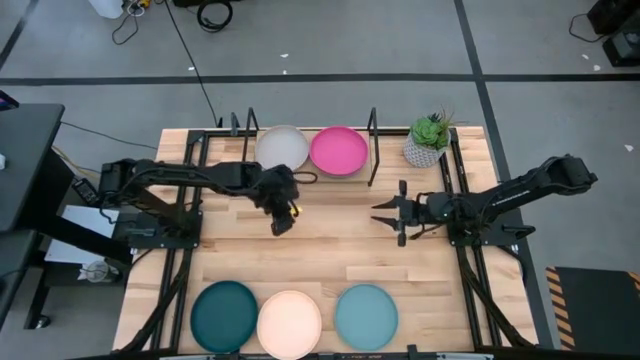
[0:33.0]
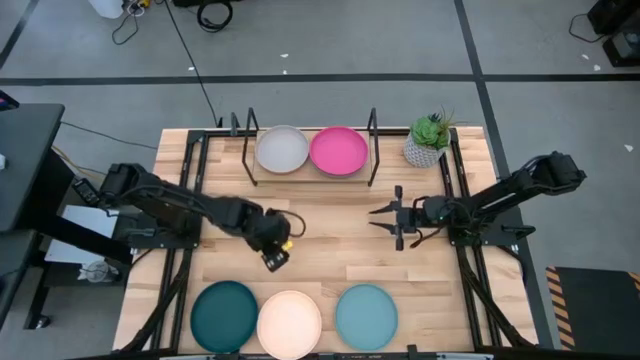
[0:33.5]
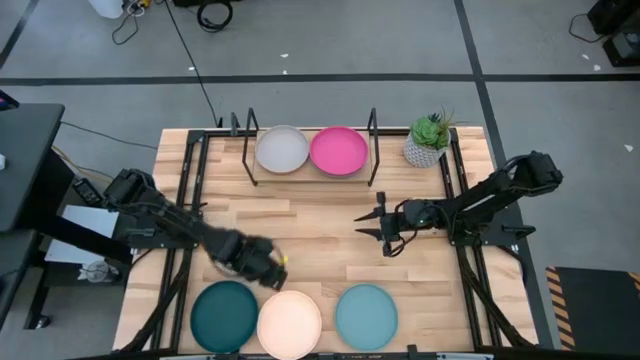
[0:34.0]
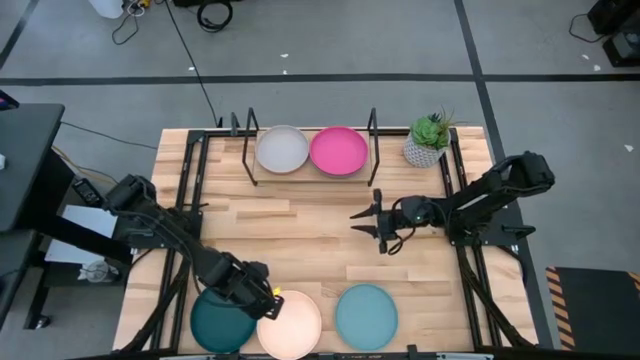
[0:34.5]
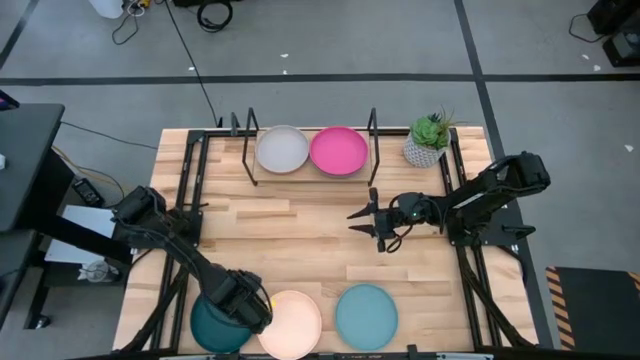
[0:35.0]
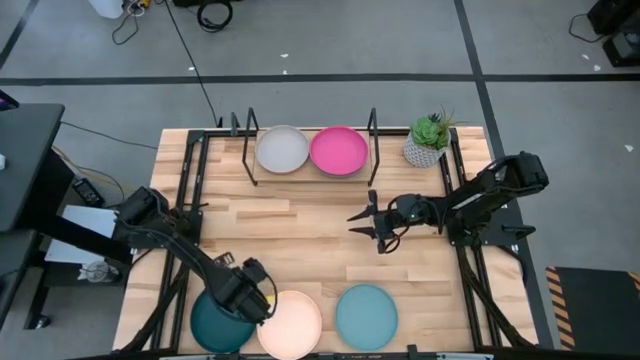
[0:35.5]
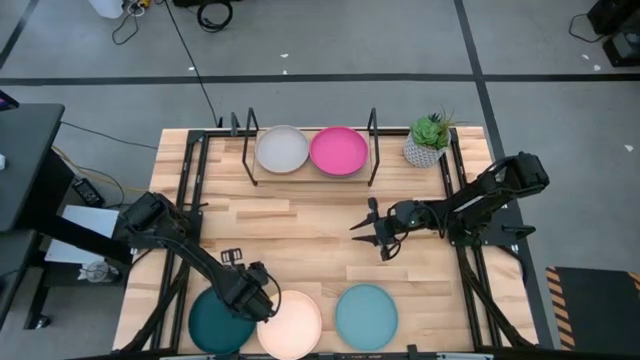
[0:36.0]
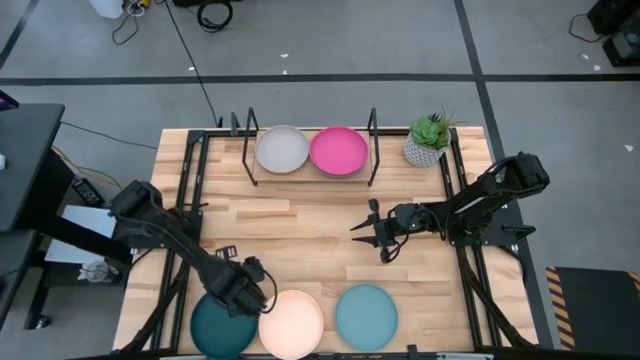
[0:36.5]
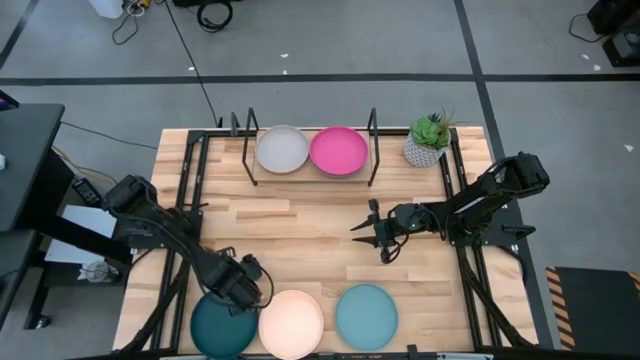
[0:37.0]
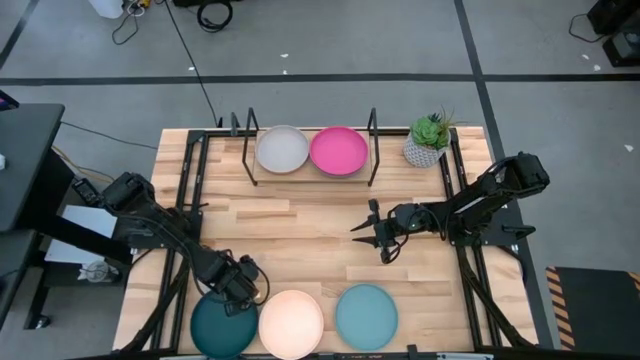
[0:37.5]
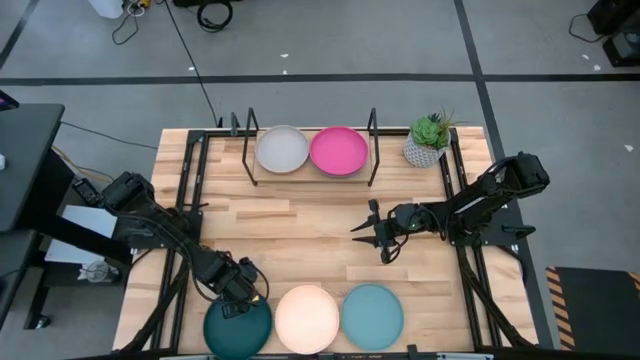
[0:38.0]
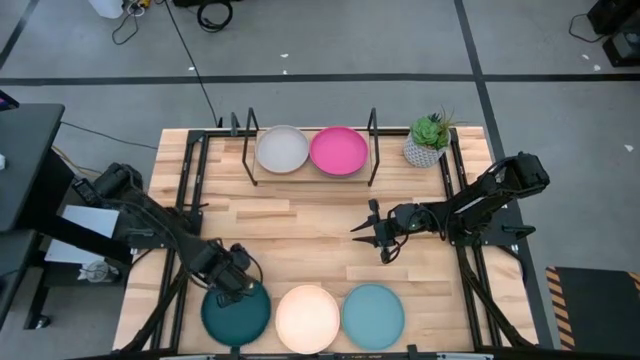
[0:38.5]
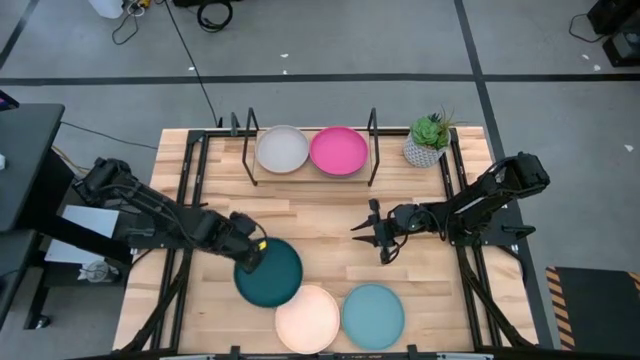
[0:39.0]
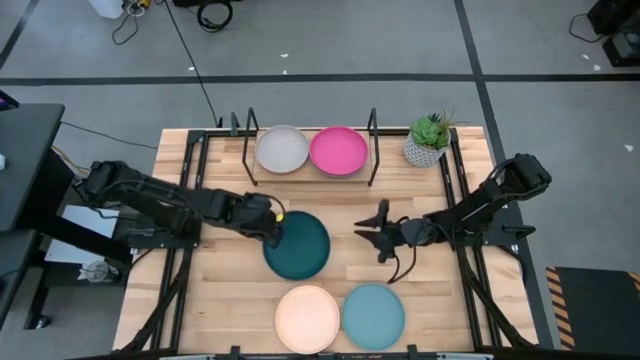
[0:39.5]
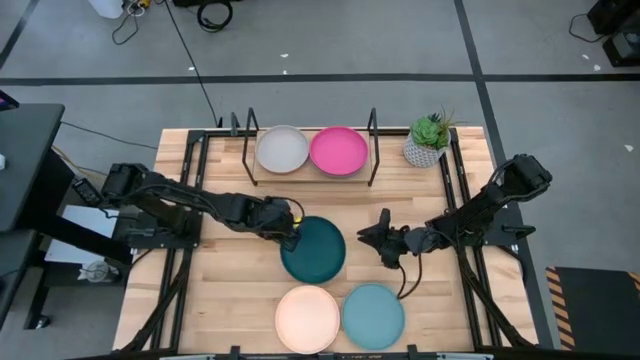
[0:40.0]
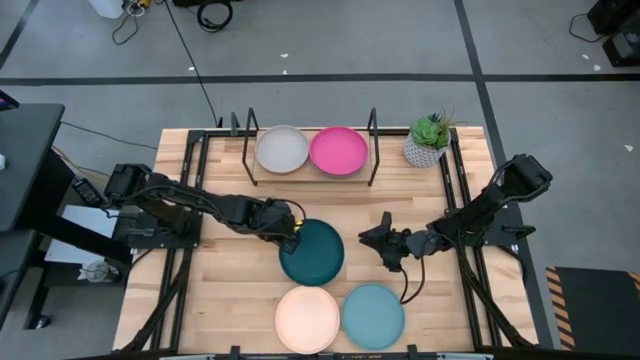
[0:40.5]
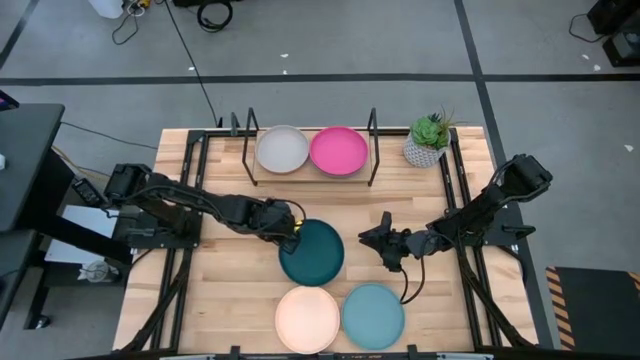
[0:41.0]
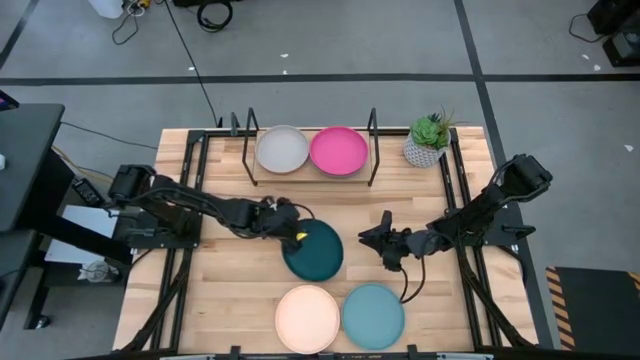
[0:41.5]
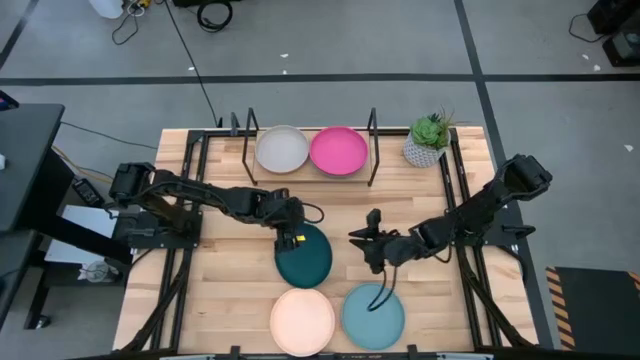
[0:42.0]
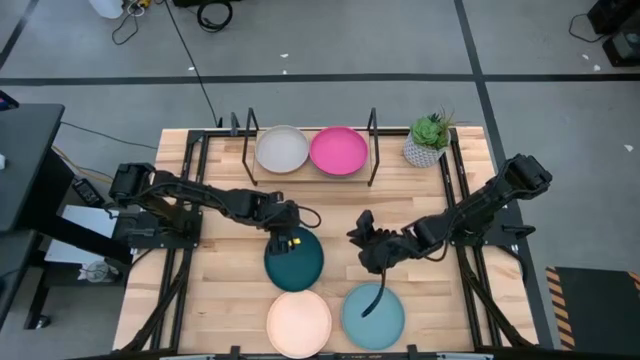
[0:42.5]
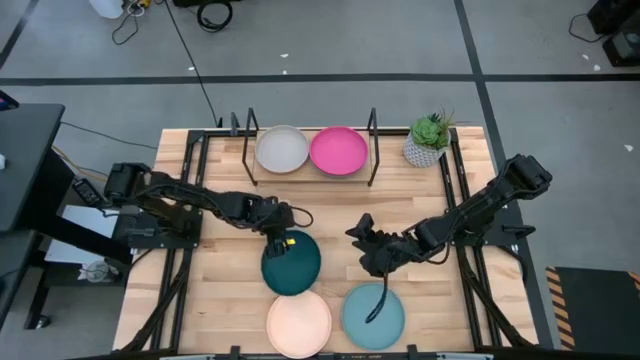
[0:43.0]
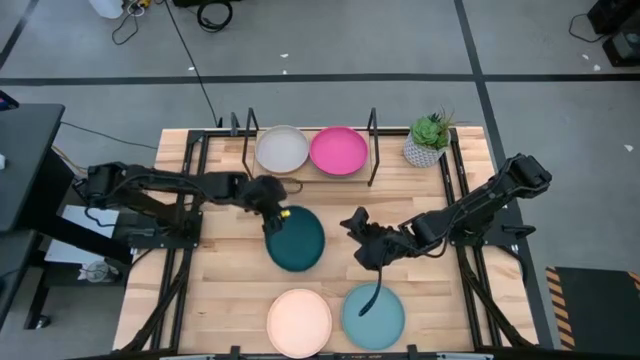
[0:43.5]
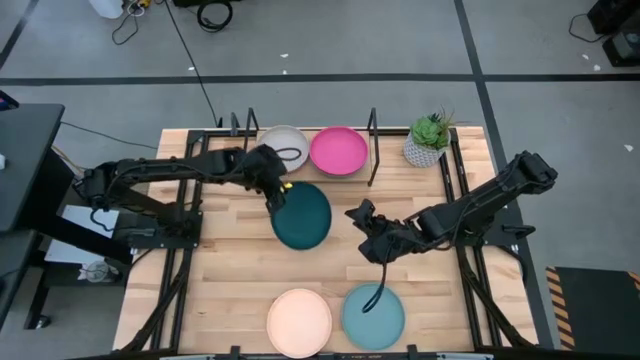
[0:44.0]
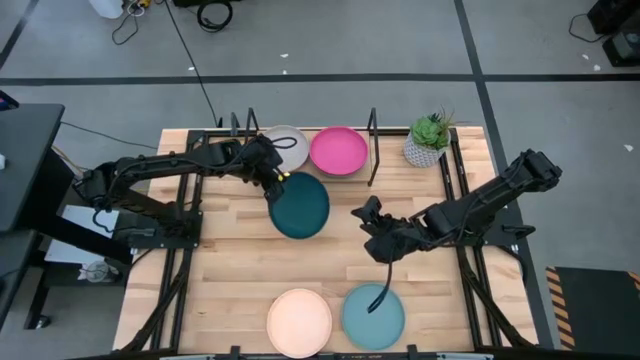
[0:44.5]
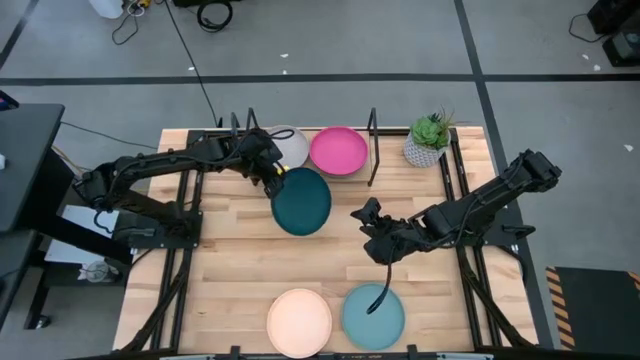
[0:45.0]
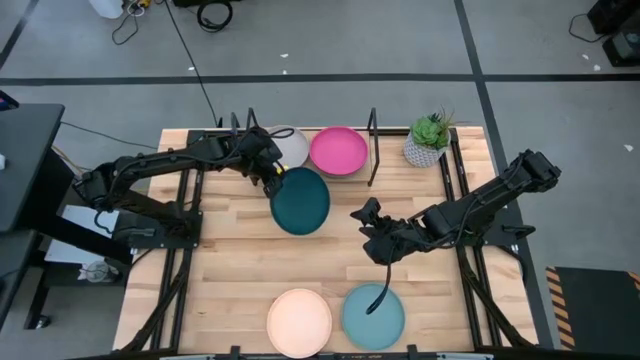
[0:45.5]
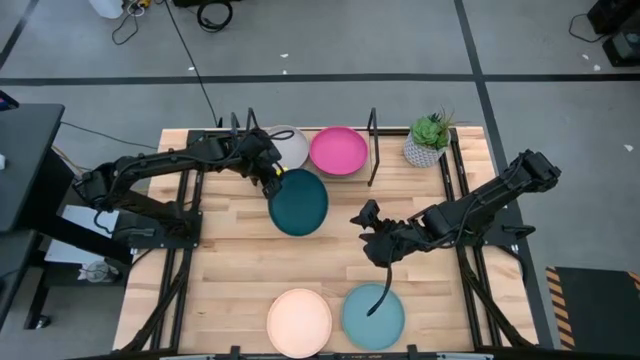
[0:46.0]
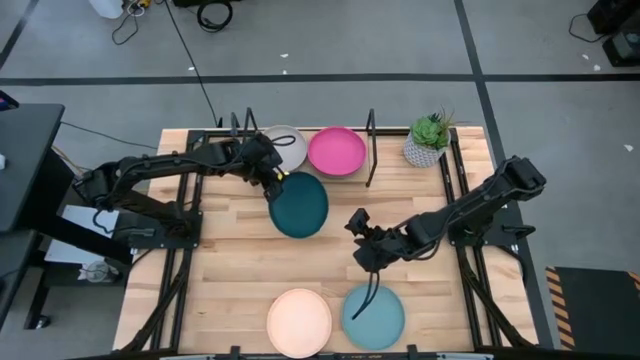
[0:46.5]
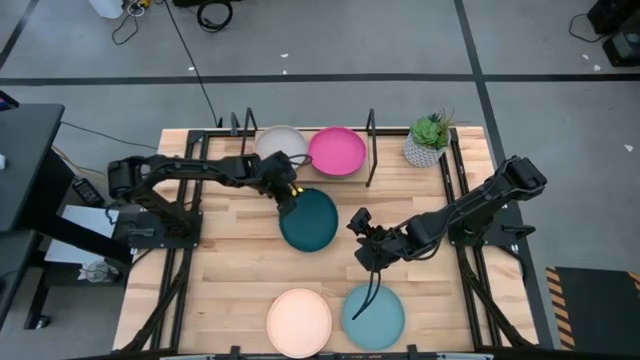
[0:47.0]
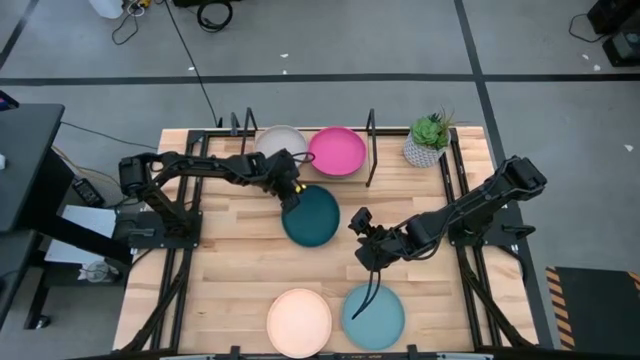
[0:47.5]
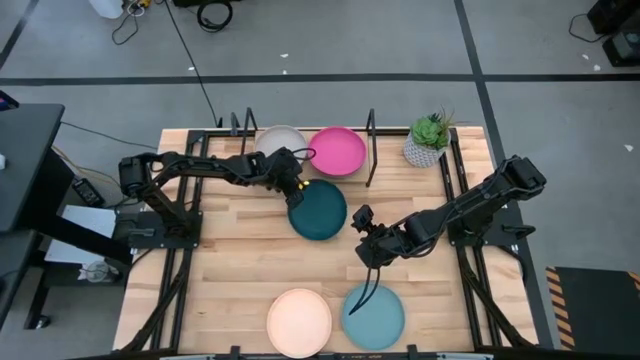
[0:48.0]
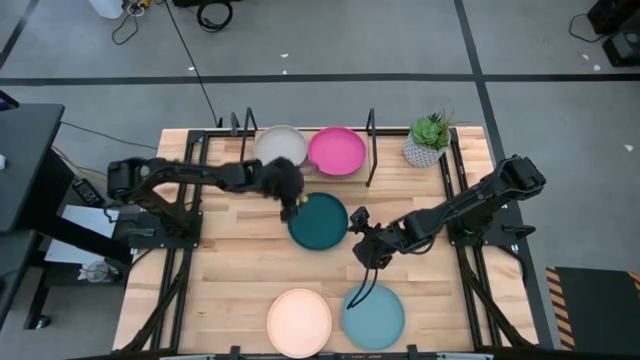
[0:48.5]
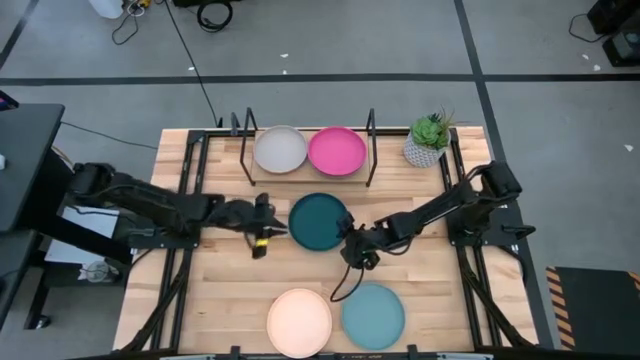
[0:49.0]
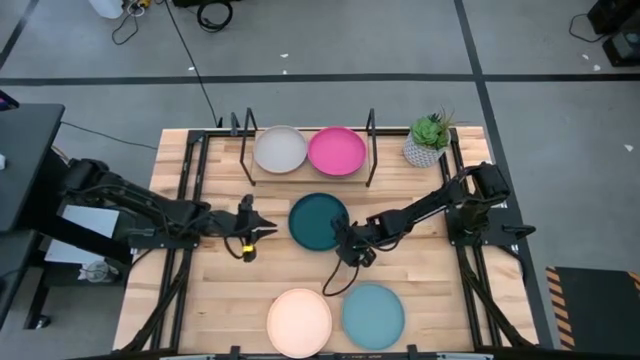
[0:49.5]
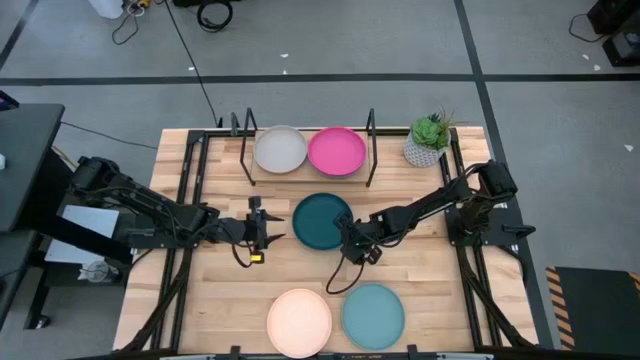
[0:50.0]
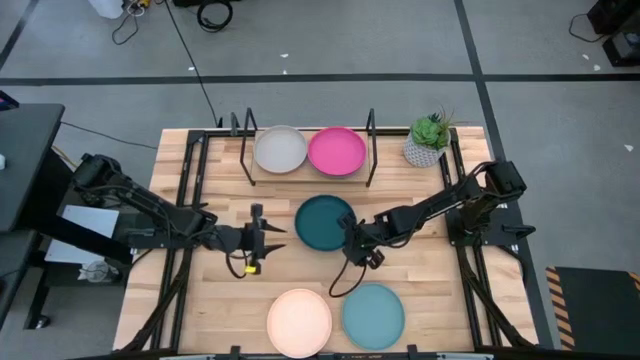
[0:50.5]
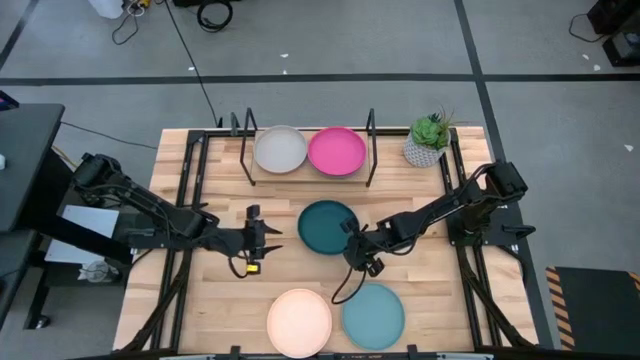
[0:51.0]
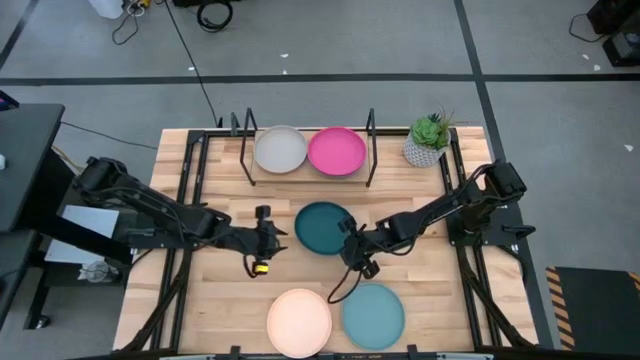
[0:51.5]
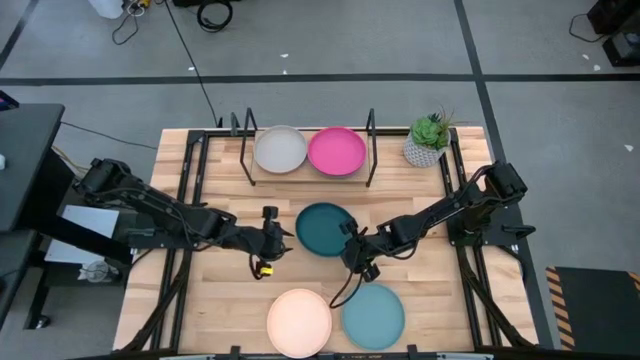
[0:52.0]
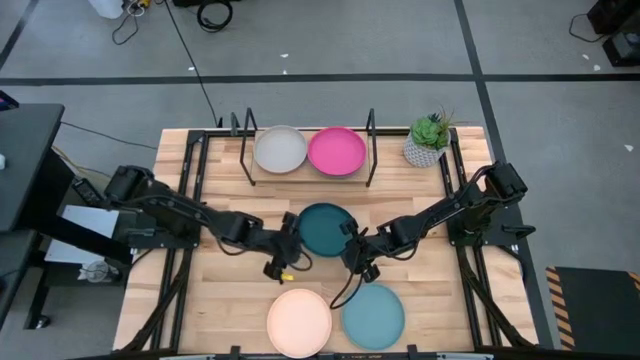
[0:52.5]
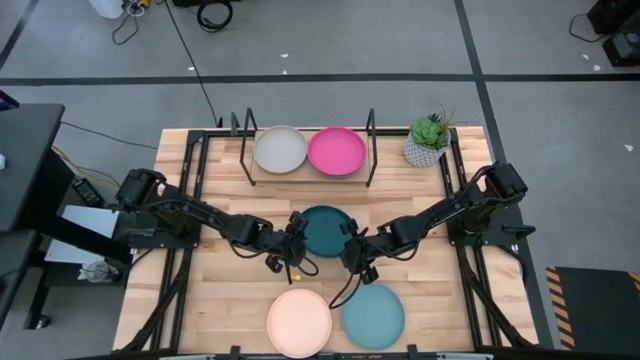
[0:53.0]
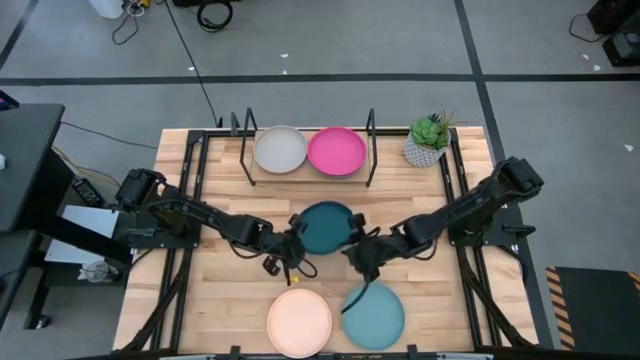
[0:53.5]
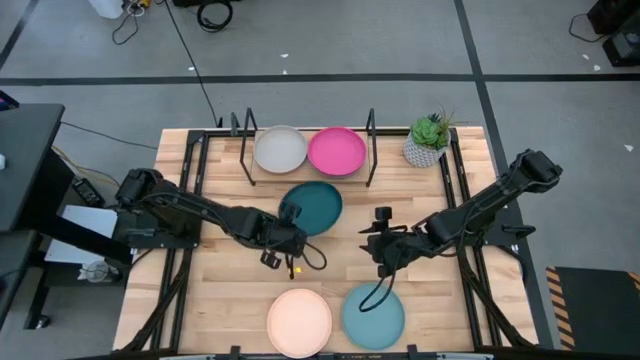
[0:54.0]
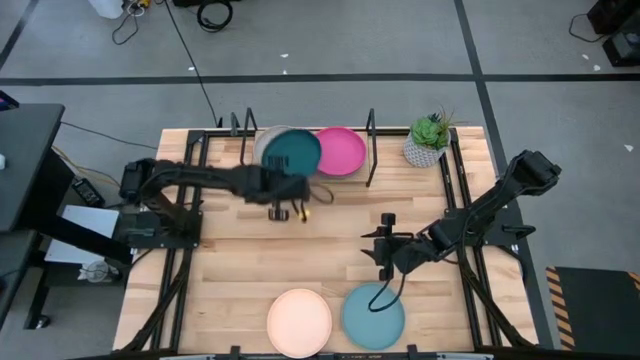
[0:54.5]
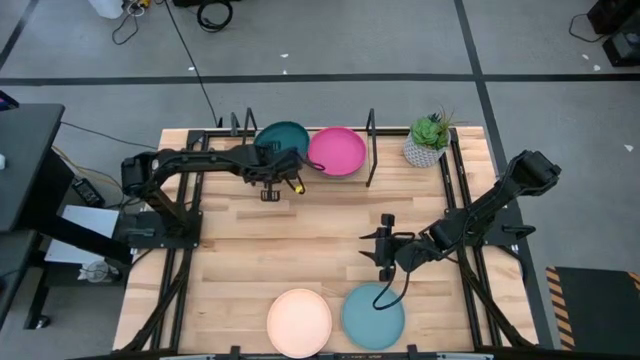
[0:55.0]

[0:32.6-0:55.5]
Task: Place and stack plates onto a shelf
Stack the dark green plate on top of the pink plate on the shelf
